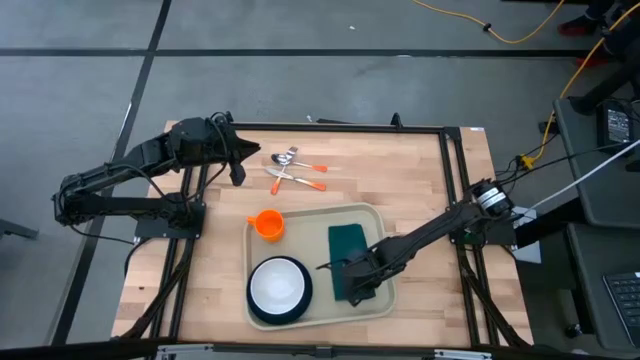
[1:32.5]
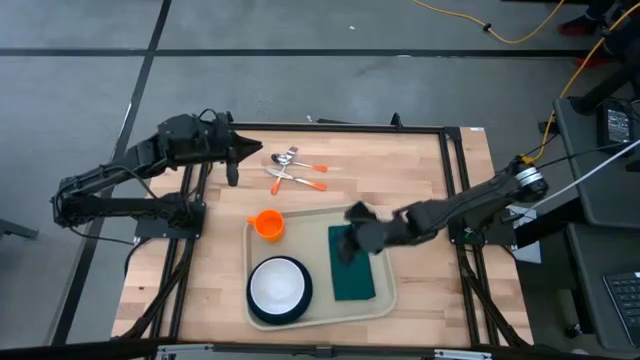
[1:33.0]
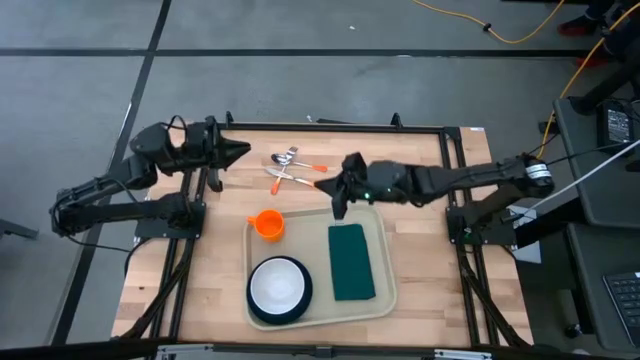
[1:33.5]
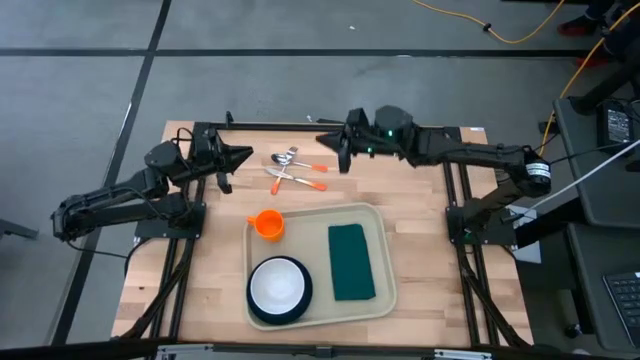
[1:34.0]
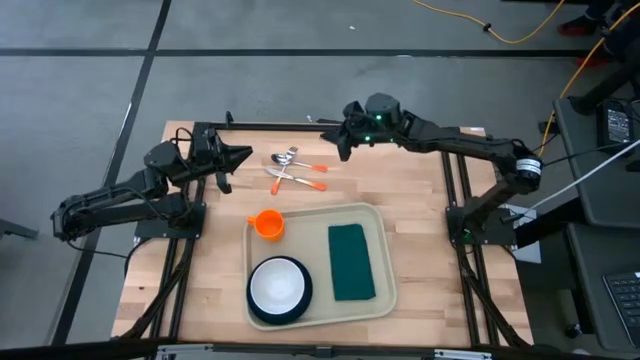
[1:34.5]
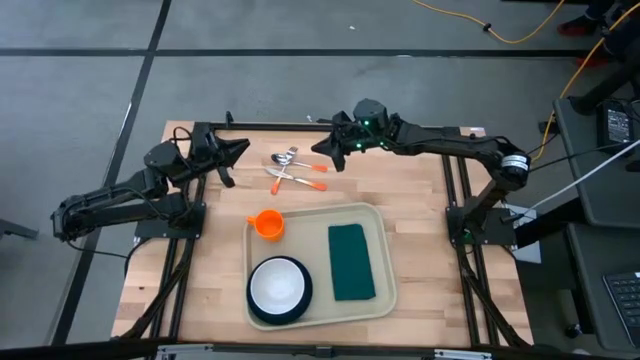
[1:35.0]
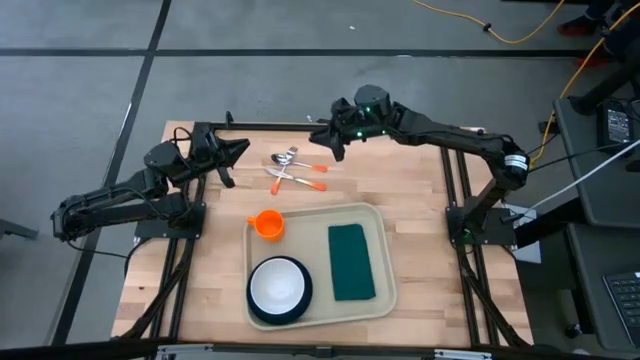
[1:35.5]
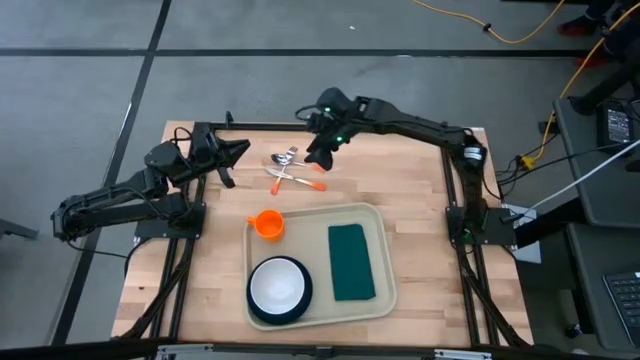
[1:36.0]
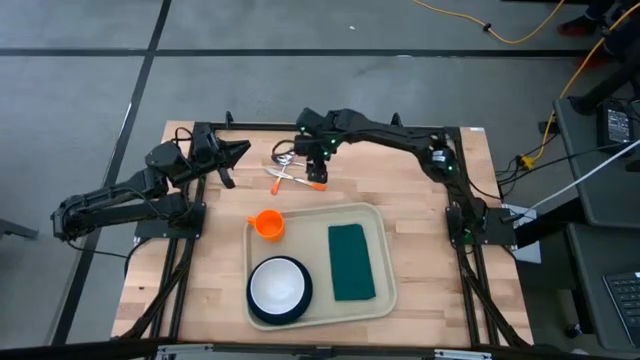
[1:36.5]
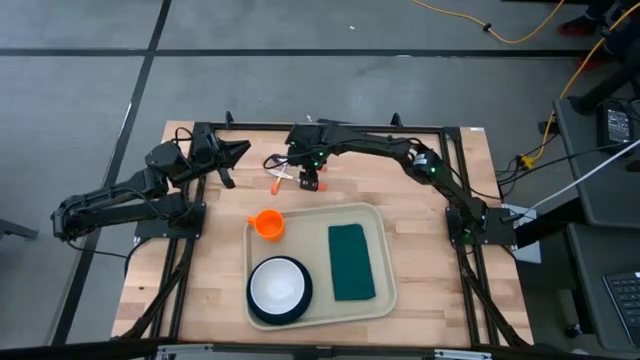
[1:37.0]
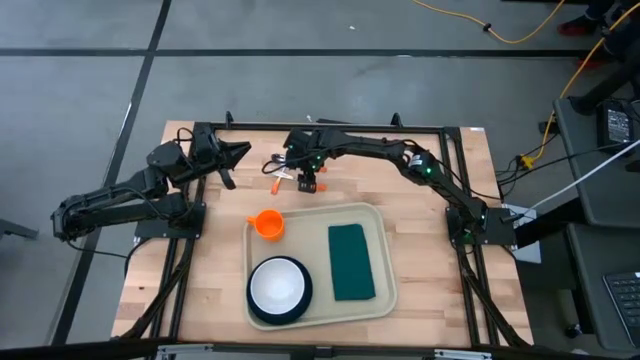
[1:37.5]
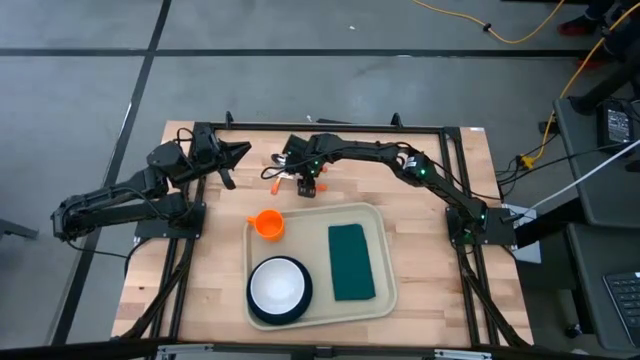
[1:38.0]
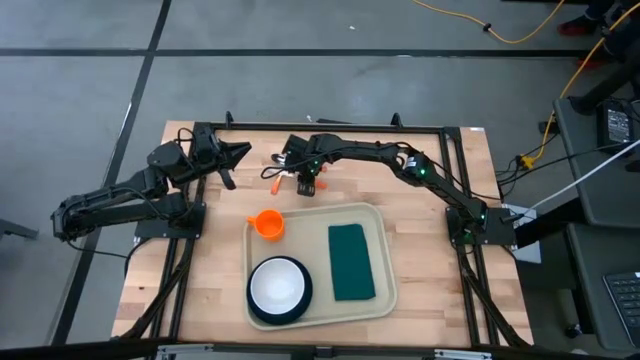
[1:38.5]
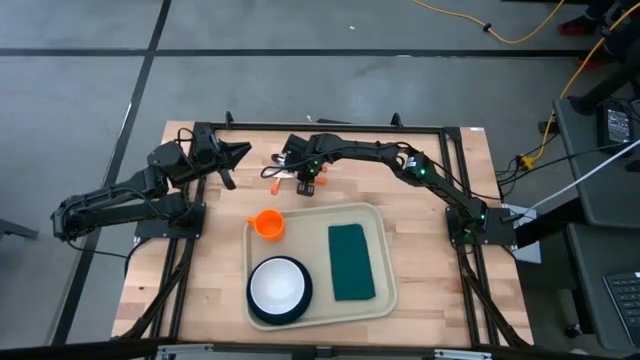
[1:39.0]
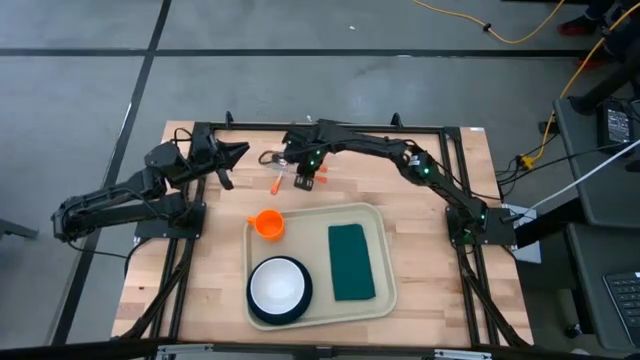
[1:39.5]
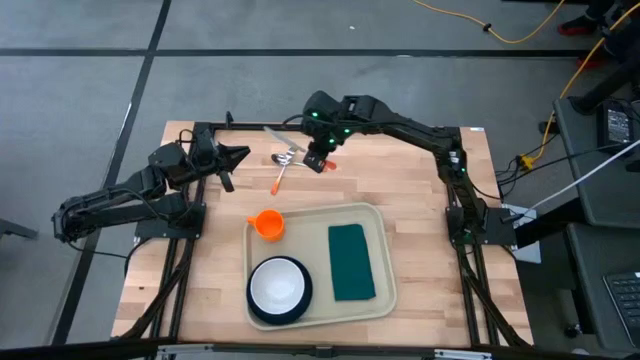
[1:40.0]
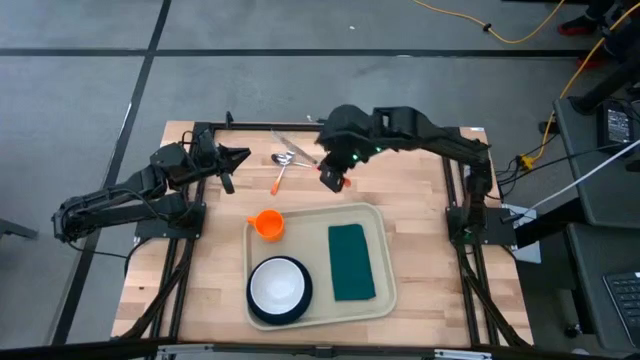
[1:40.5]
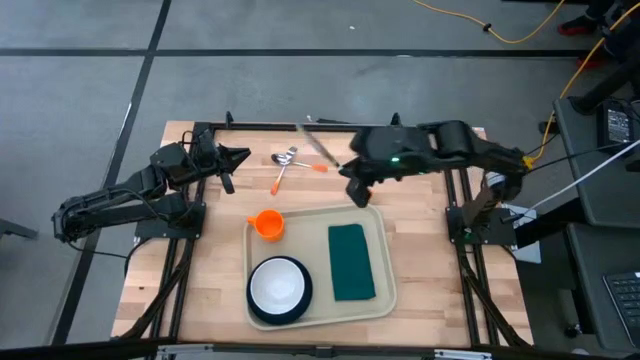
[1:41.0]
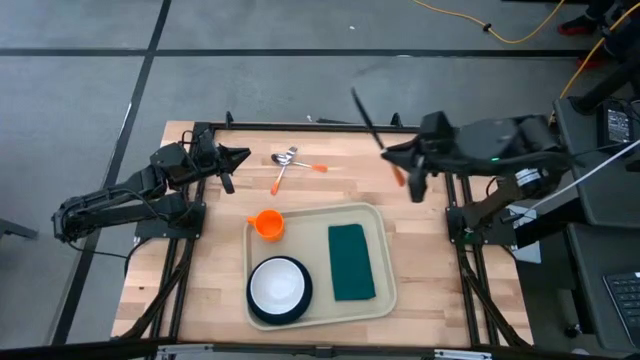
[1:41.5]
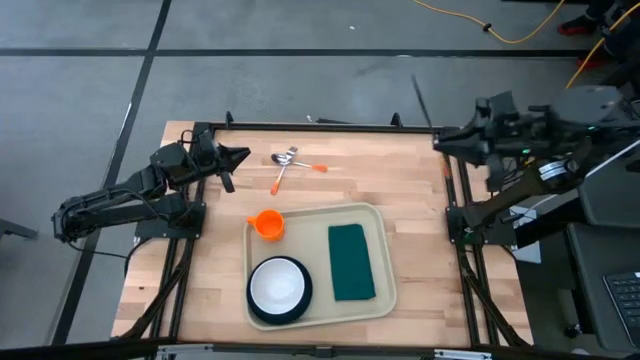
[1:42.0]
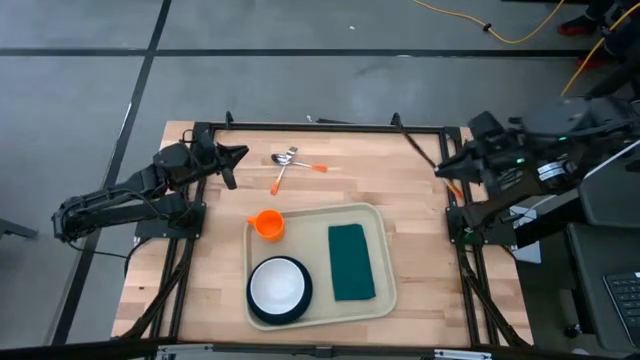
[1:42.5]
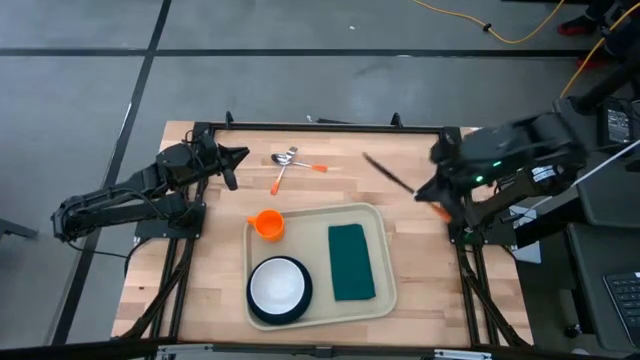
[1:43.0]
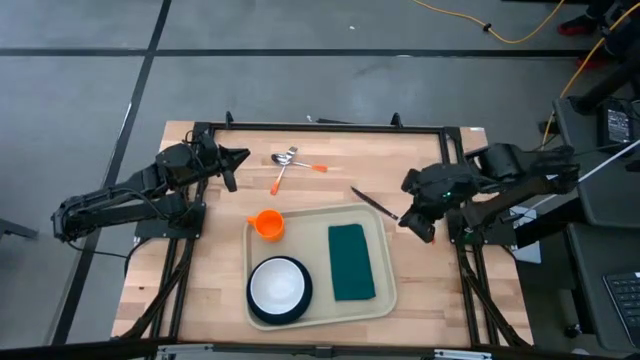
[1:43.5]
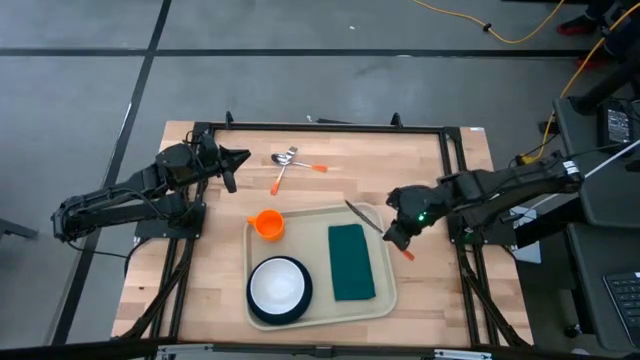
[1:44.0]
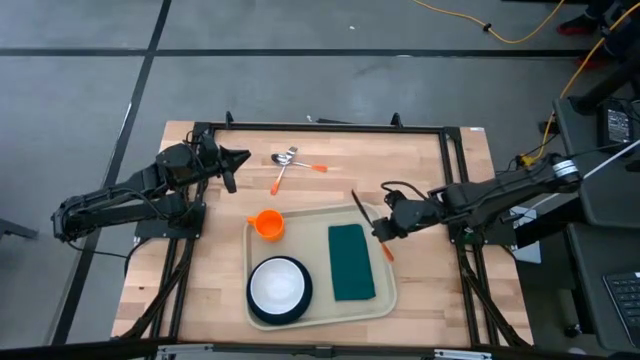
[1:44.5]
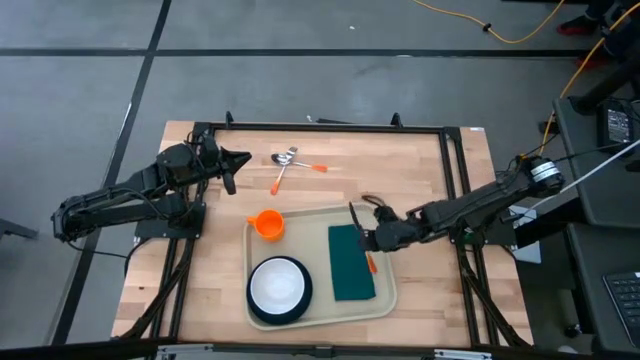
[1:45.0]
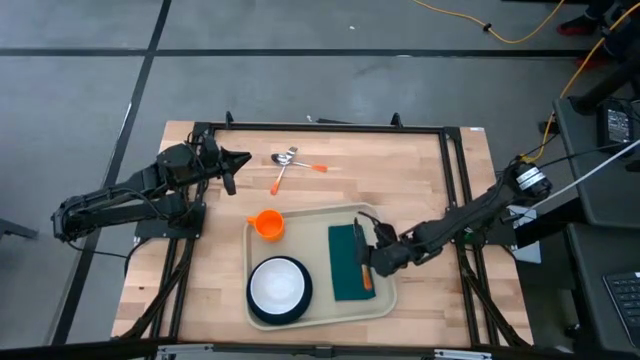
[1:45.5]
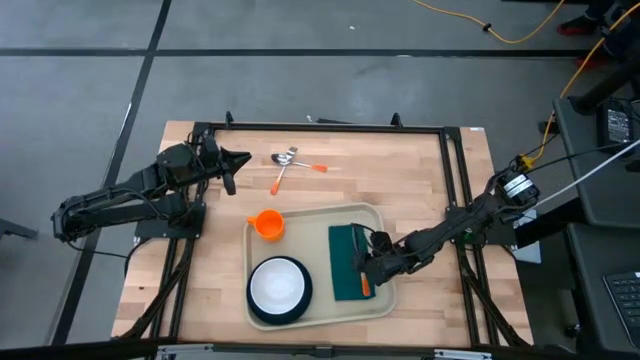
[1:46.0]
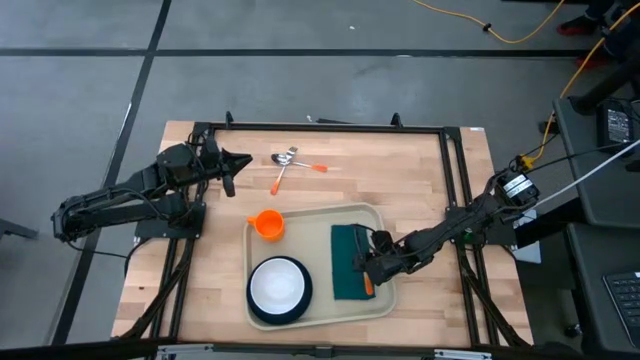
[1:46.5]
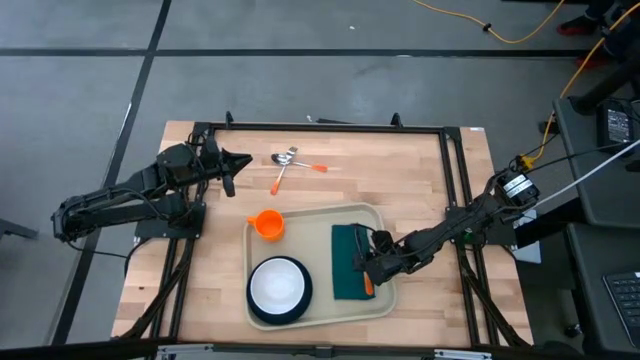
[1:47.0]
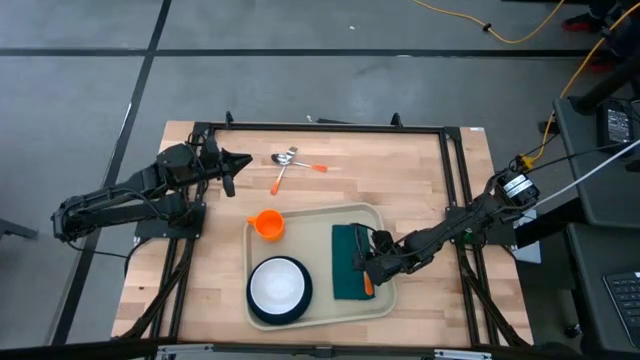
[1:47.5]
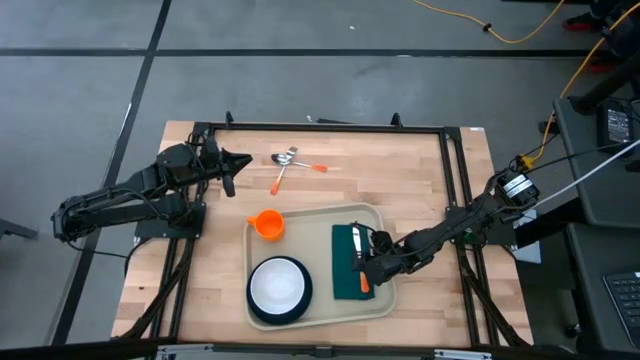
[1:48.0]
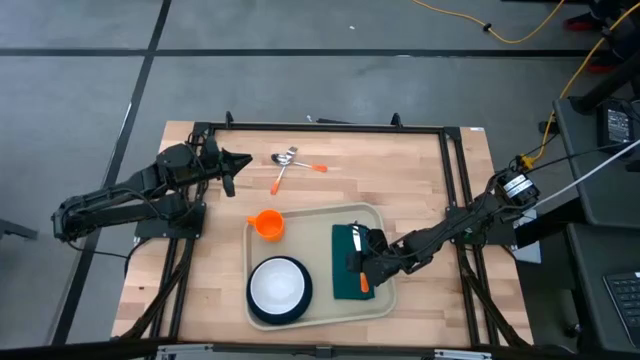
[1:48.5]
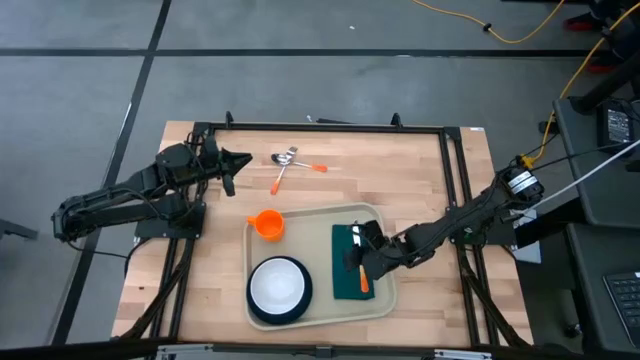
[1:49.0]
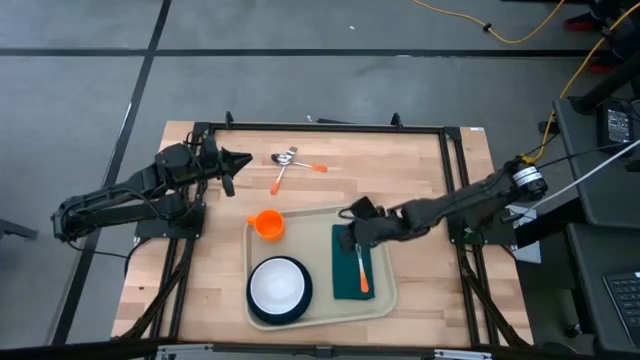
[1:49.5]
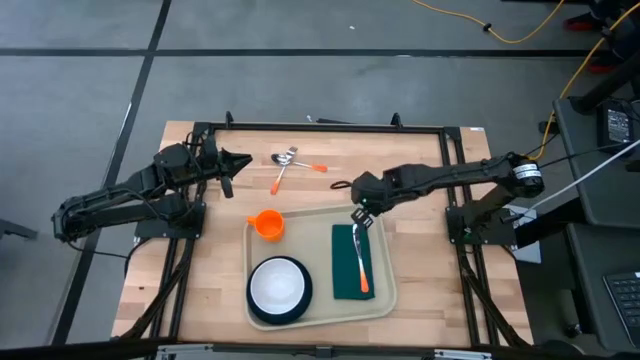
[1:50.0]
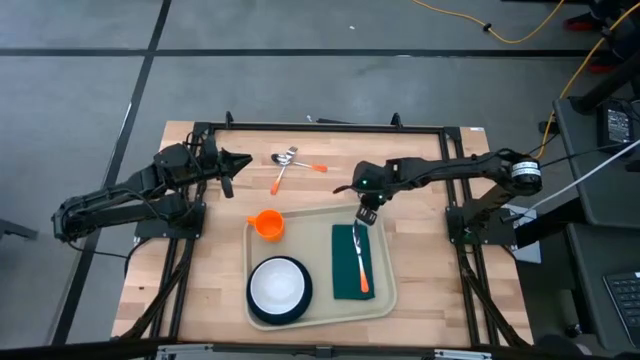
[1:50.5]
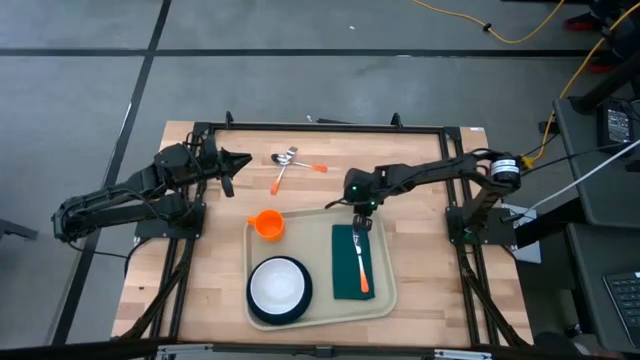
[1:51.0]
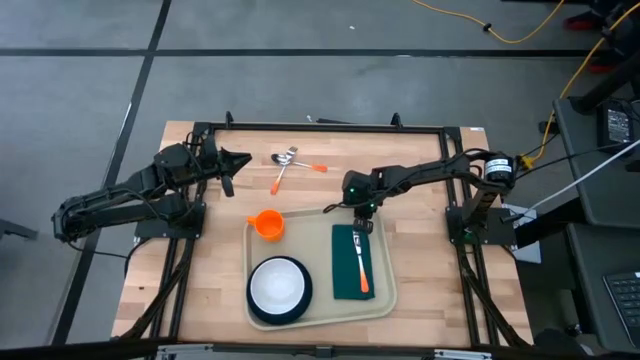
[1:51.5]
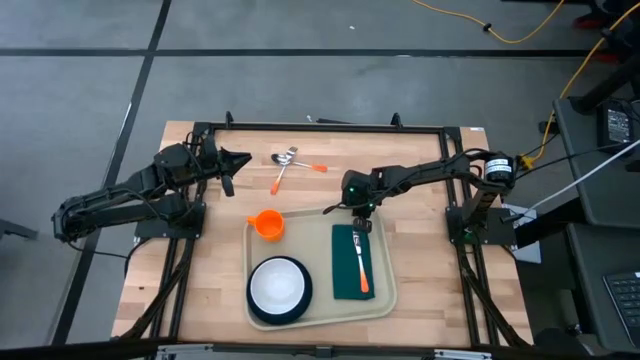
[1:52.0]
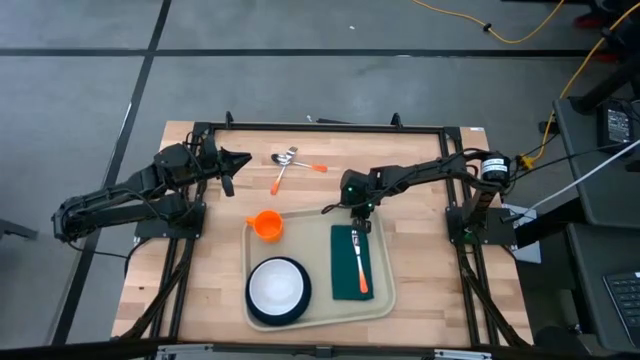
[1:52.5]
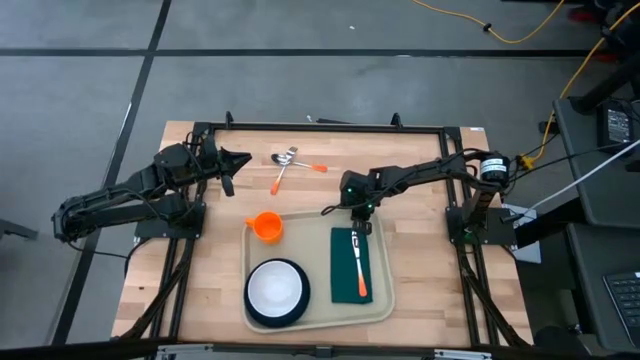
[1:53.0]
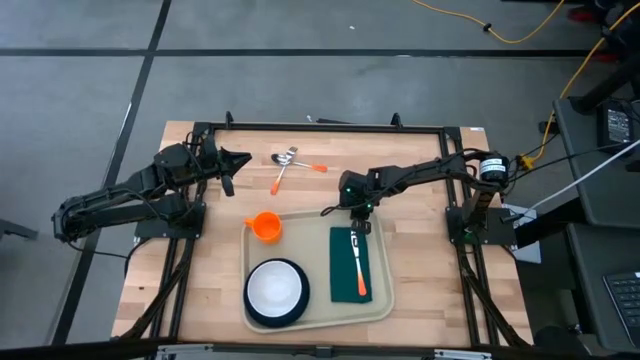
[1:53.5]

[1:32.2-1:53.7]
Task: Set up tray
Put the orange knife on the dark blue napkin on the gray serving tray

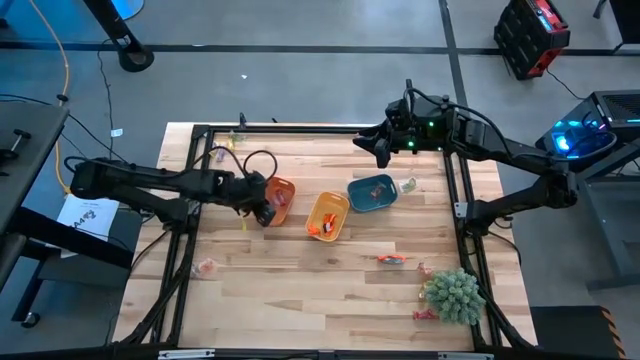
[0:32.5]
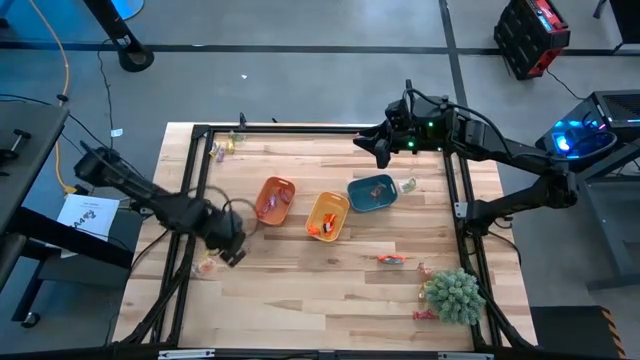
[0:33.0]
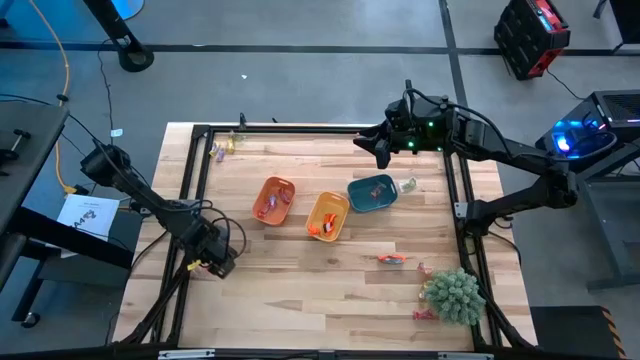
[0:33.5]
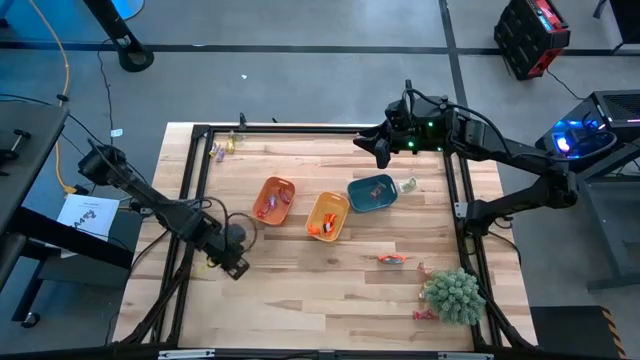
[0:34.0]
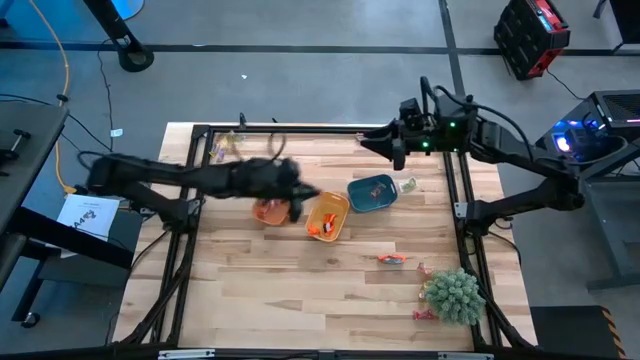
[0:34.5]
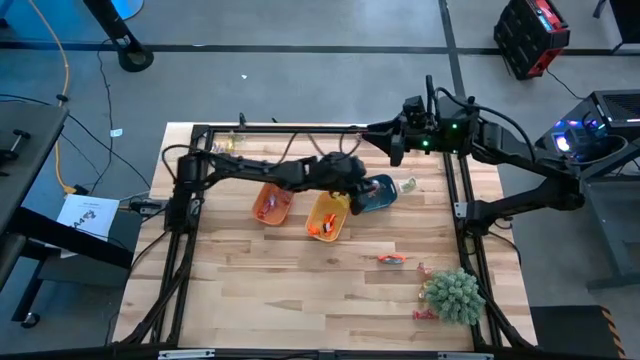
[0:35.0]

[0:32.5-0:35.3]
Task: Sort candy
Put the orange gummy into the blue bin
